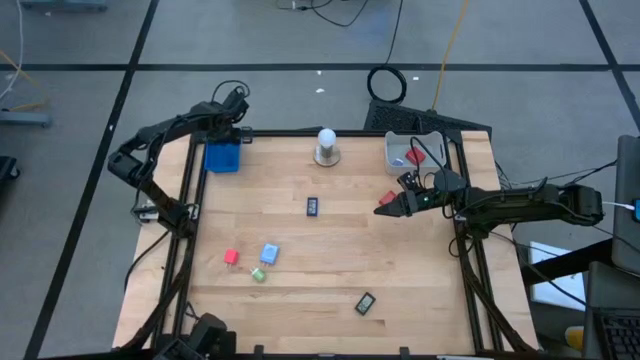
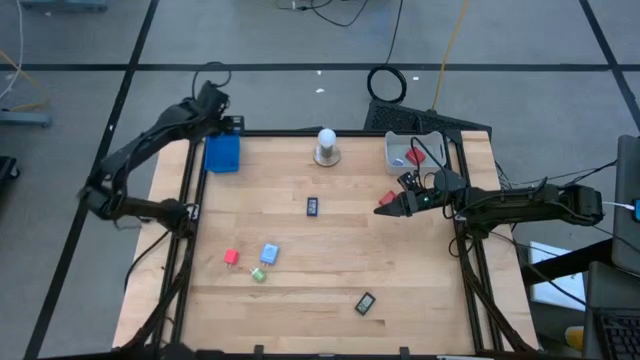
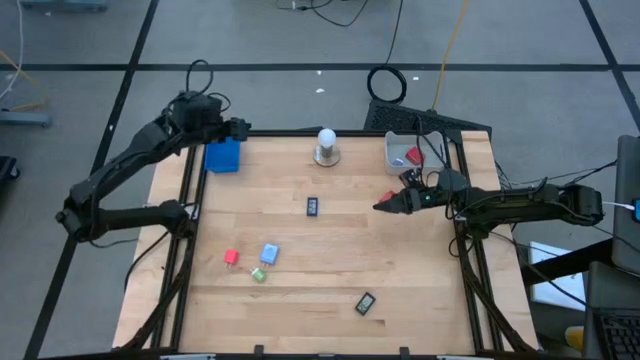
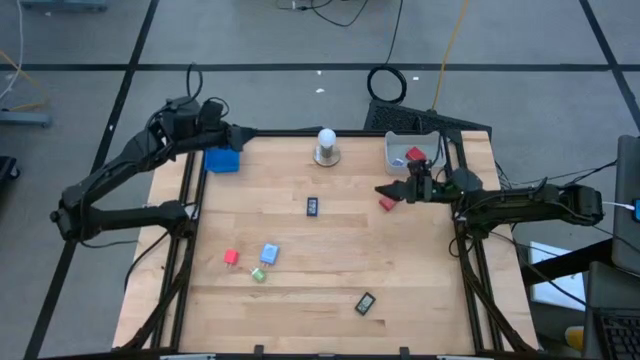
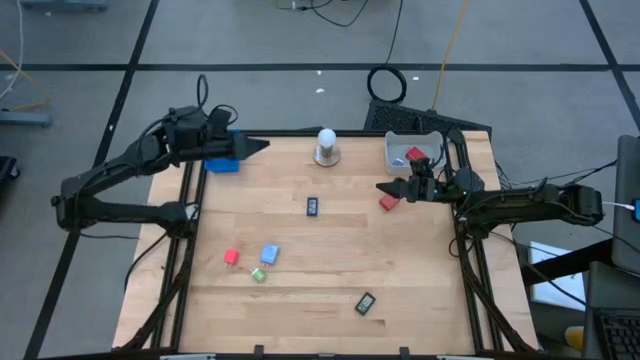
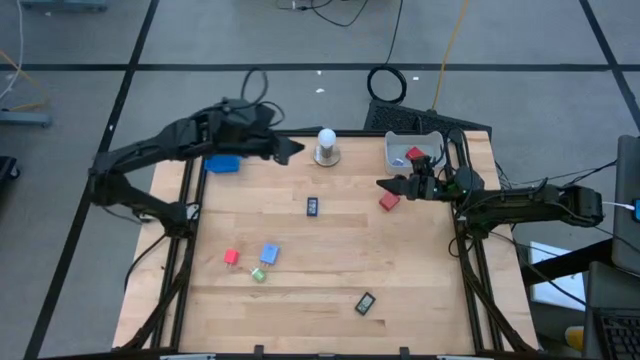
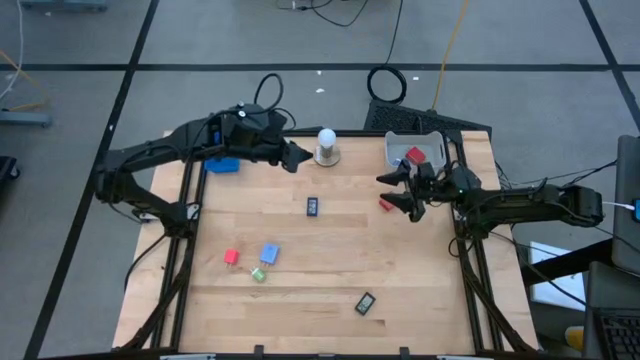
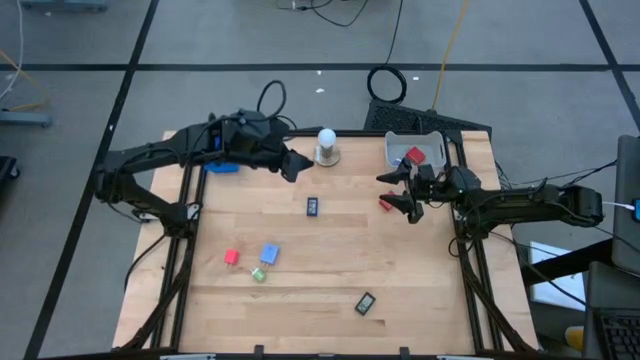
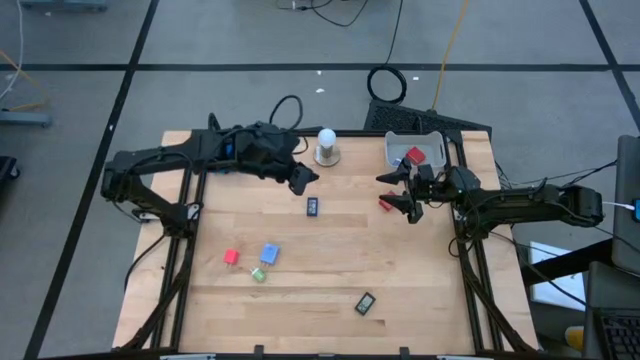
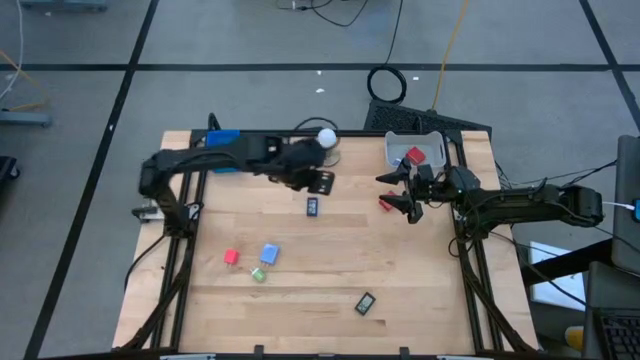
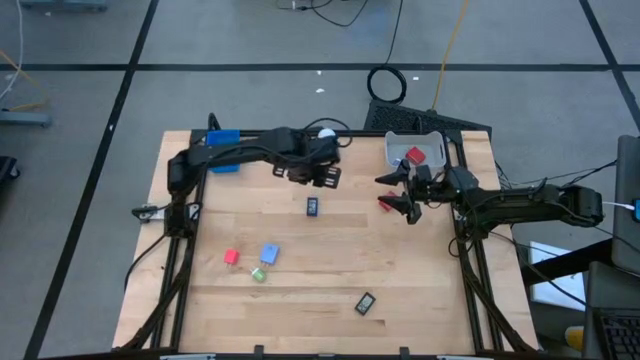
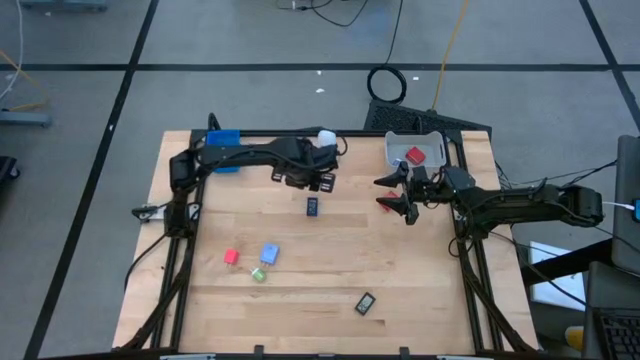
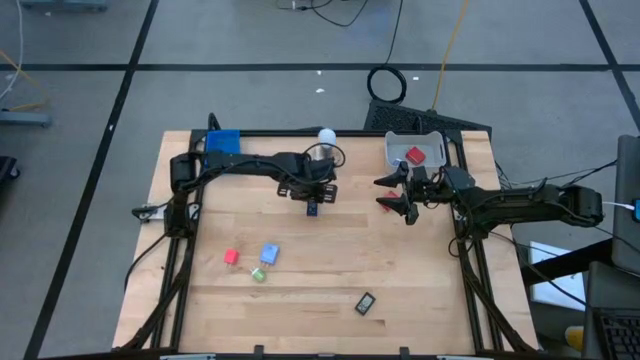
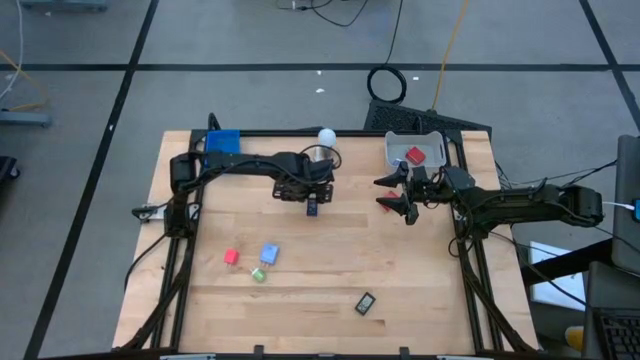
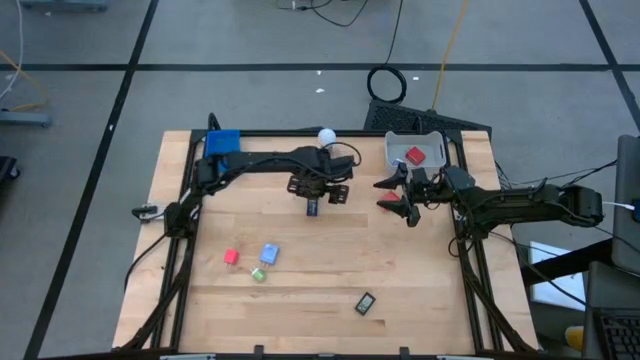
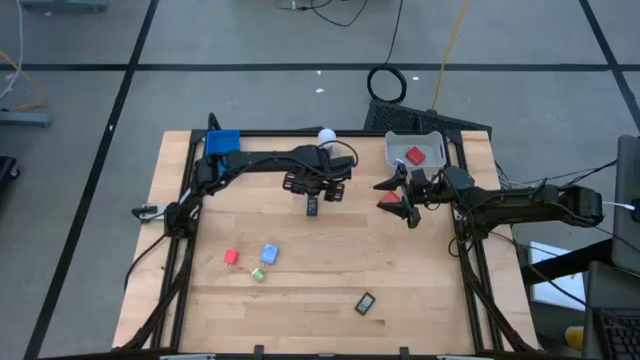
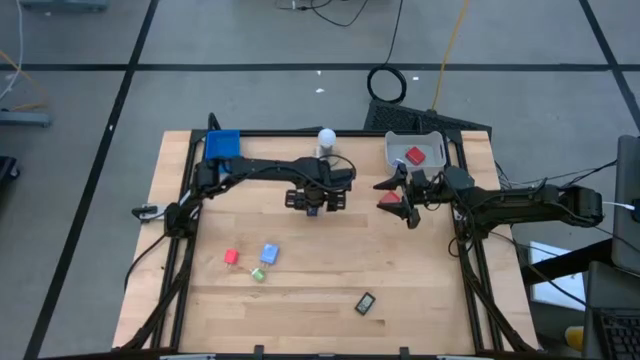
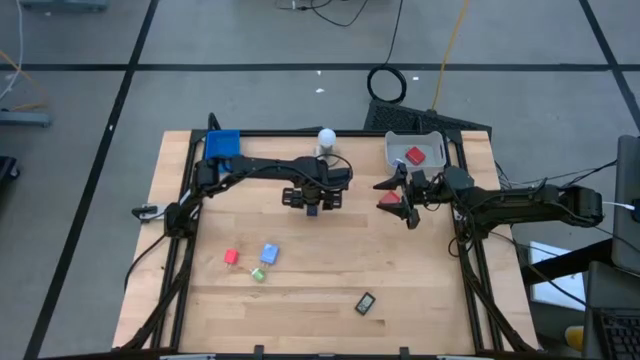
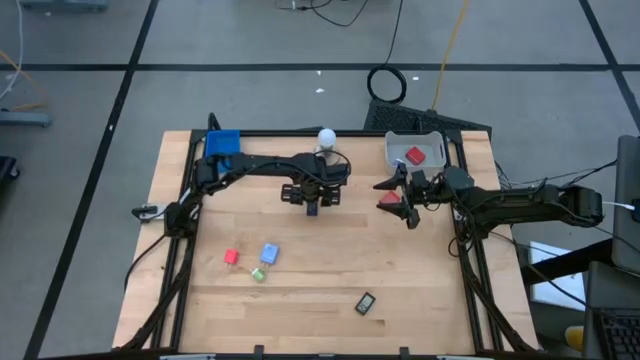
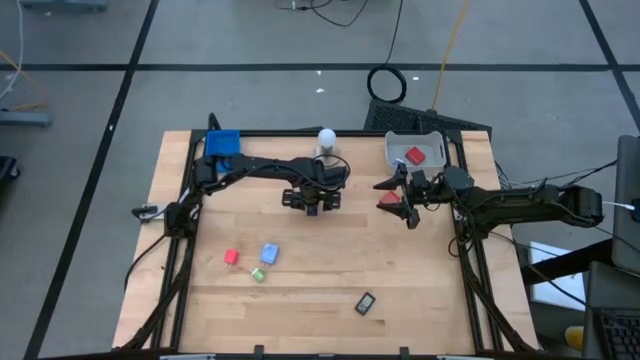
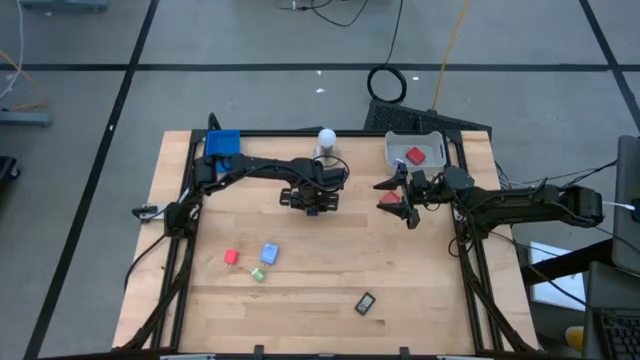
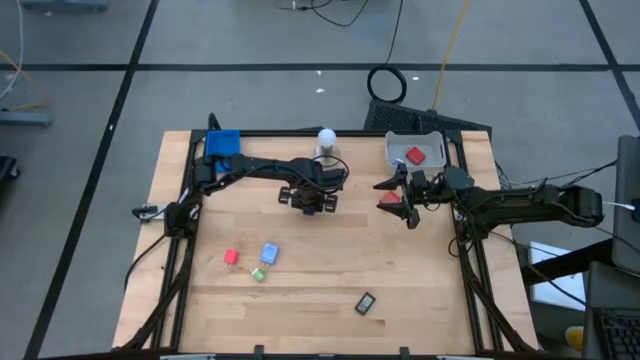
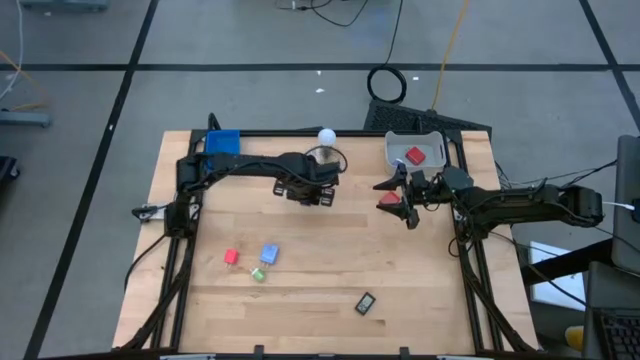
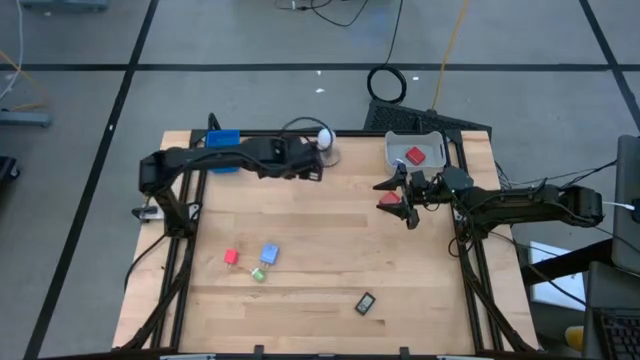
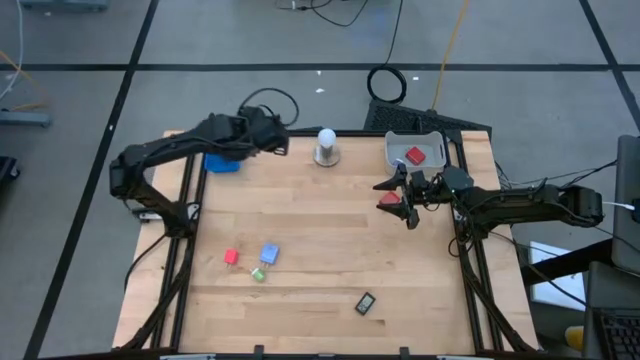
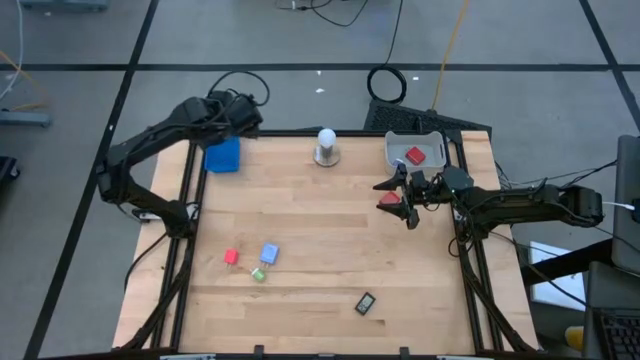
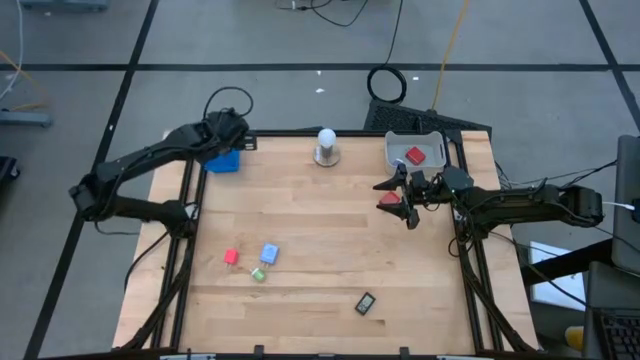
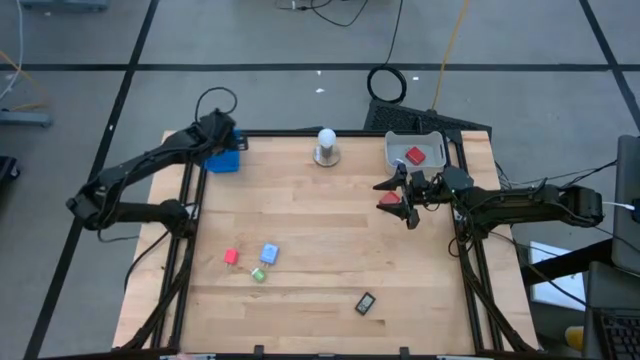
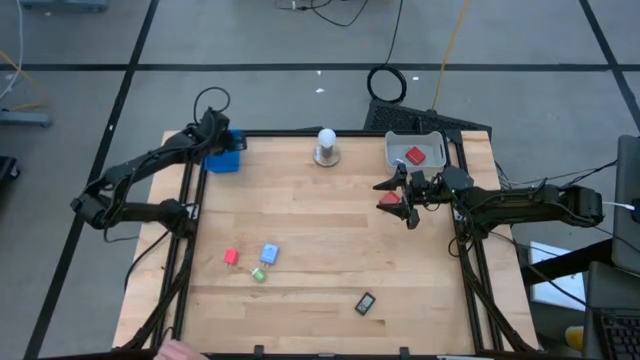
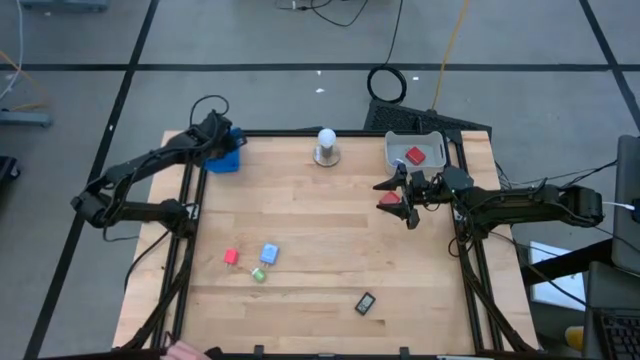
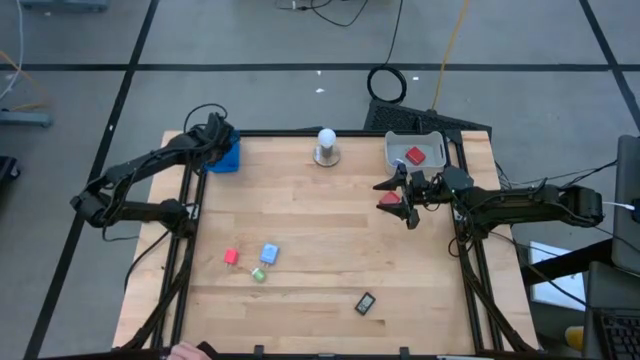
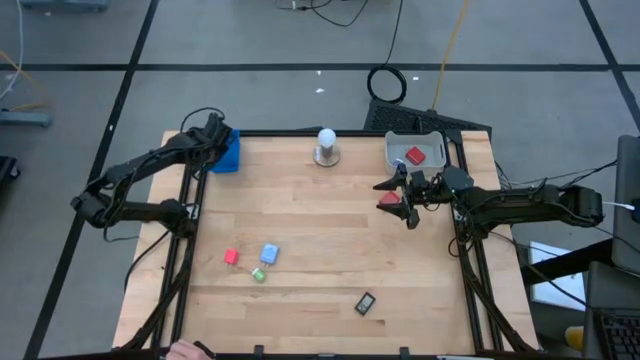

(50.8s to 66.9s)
Task: Pick & Place Office items
Put the blue digital clock into the blue bin

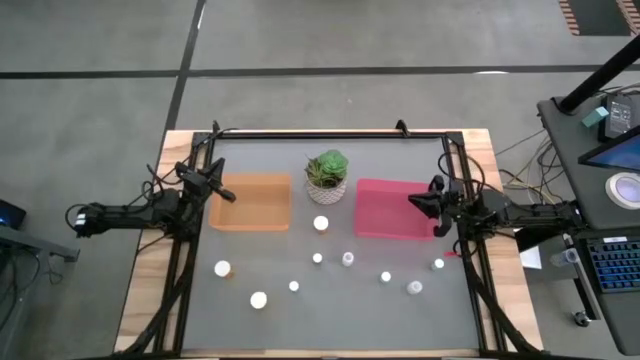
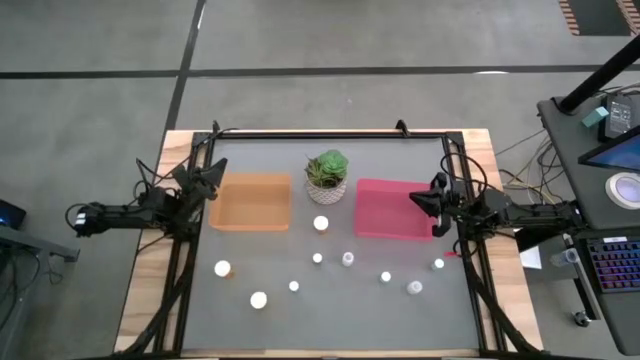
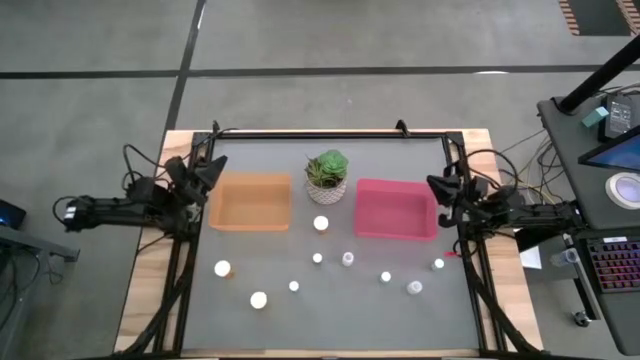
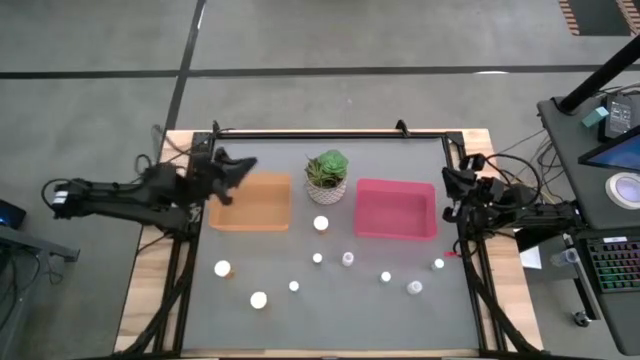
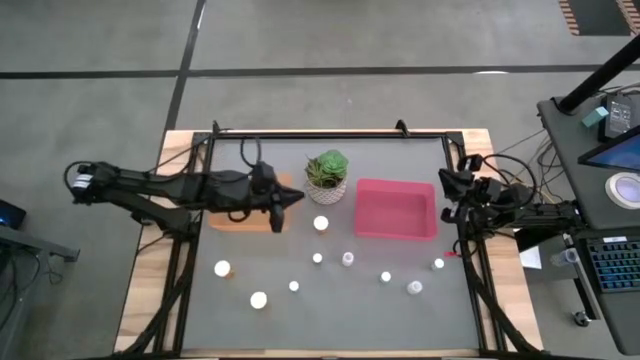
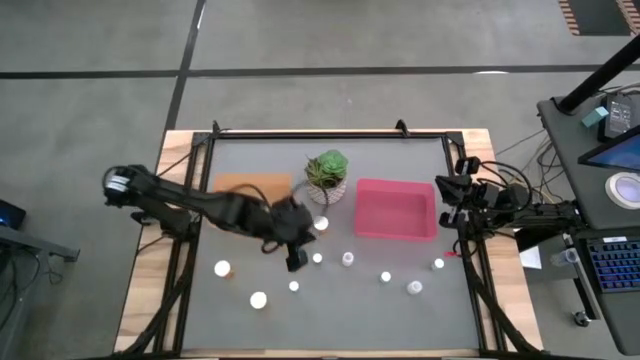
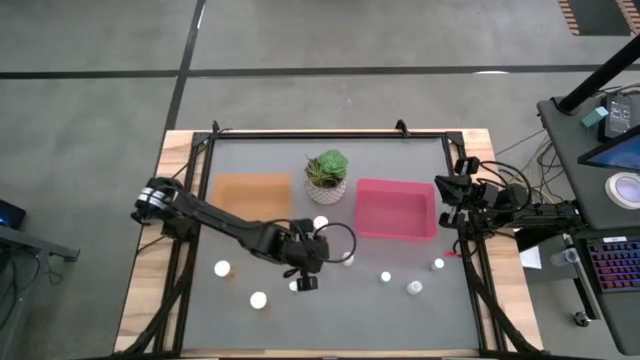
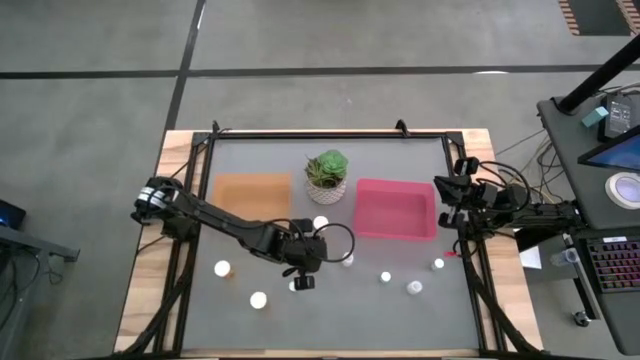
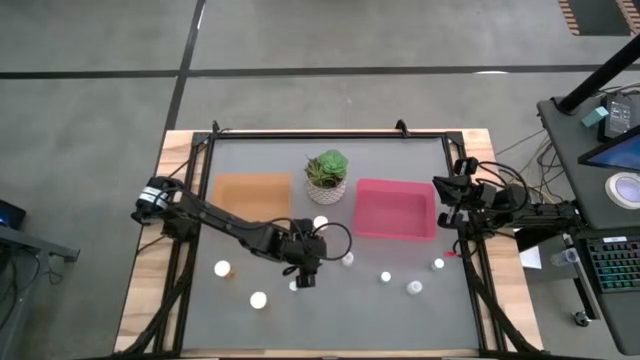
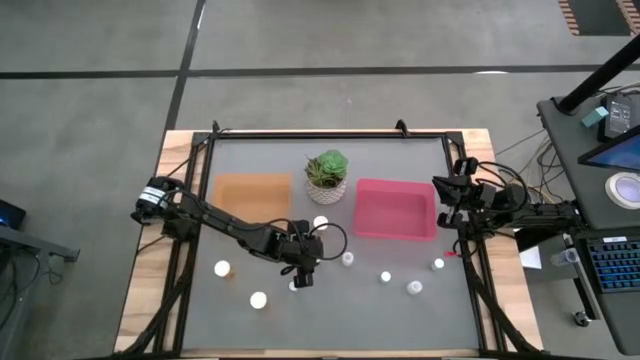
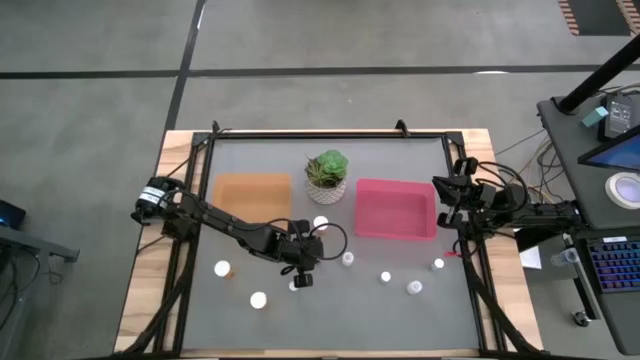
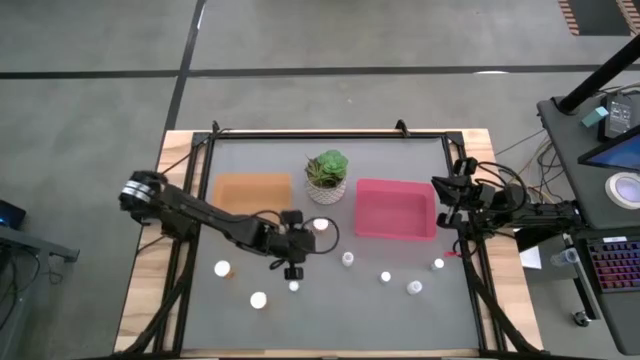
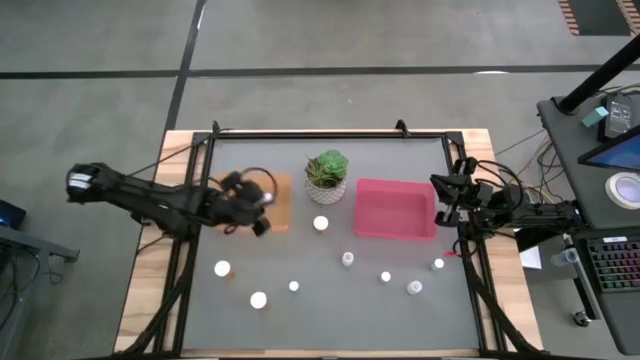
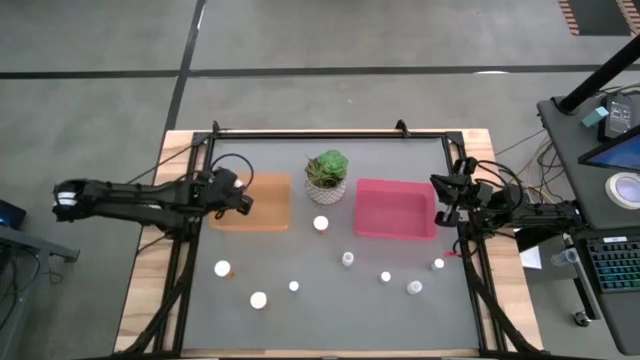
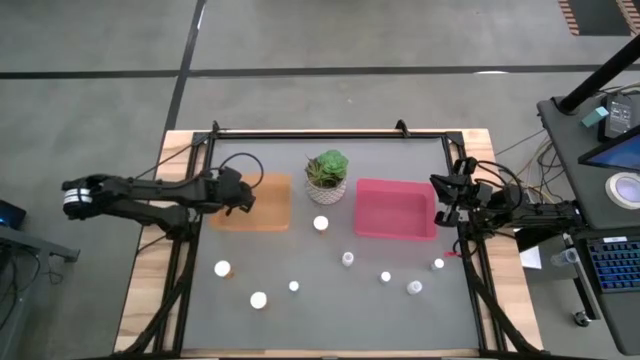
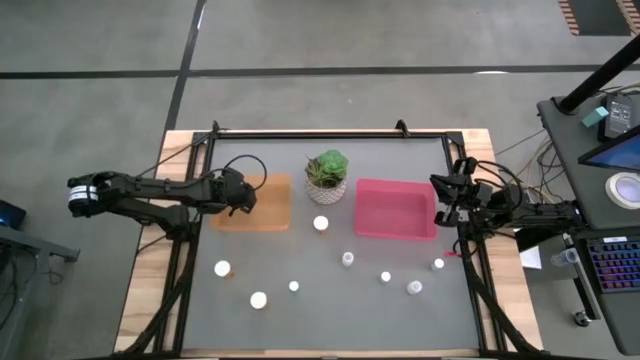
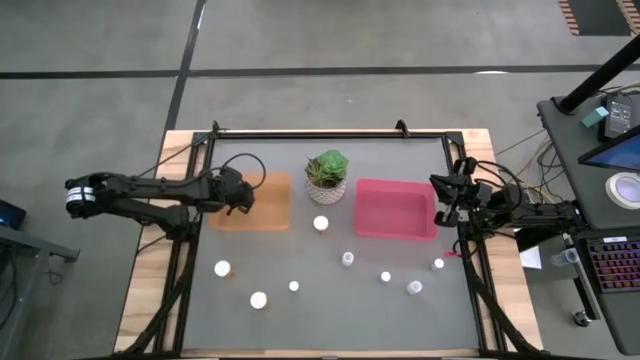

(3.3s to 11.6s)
Task: Pick and place medicine bottles into bin by pill shape (circle, oval)
Put the small red pill bottle in the orange bin
